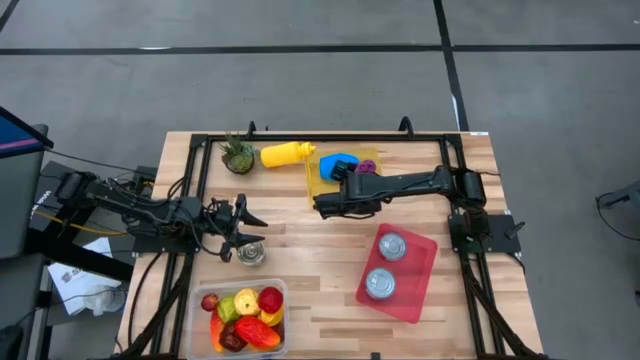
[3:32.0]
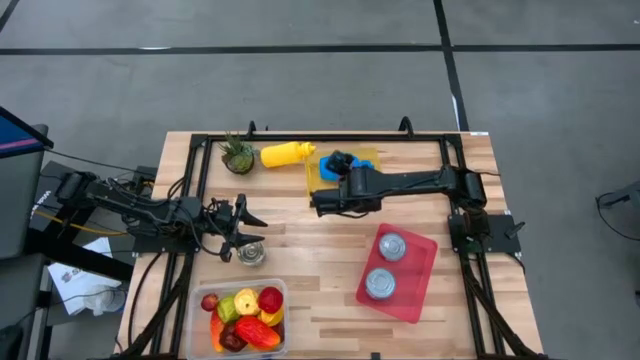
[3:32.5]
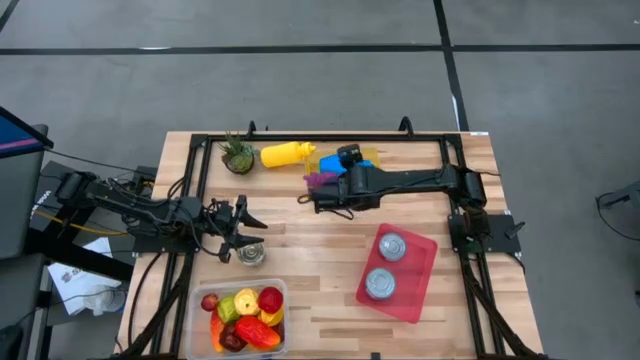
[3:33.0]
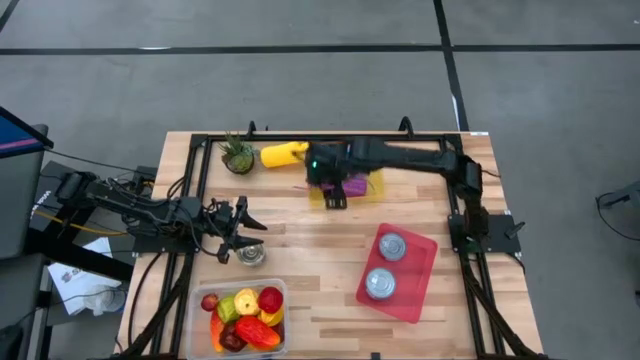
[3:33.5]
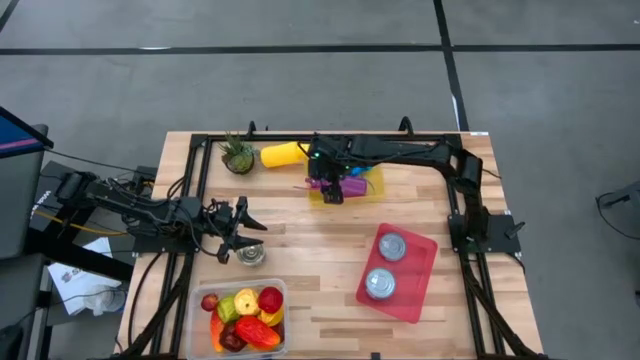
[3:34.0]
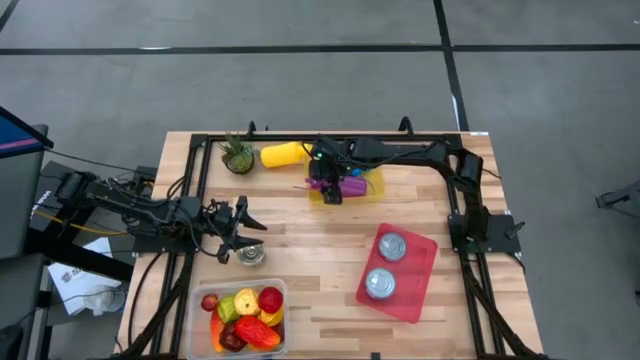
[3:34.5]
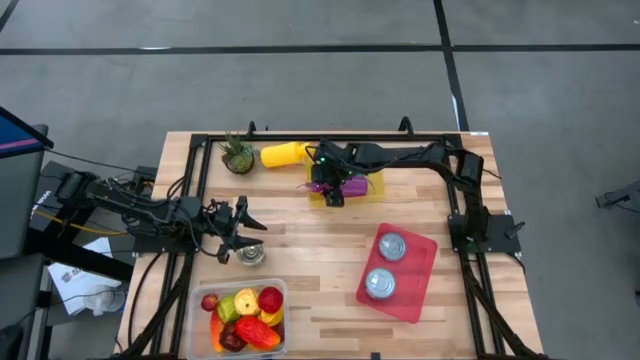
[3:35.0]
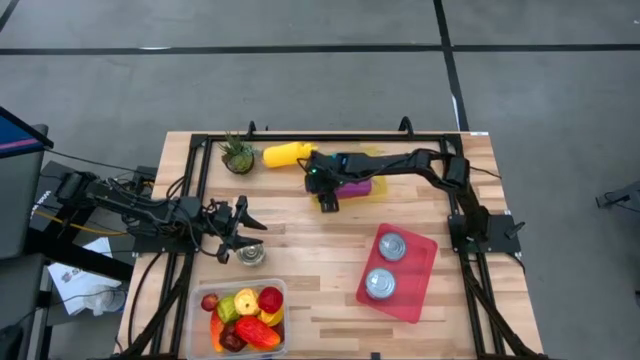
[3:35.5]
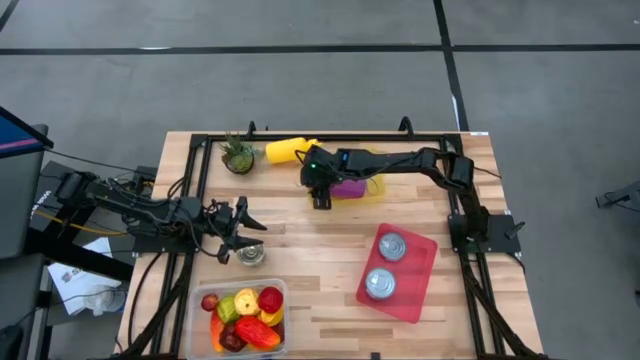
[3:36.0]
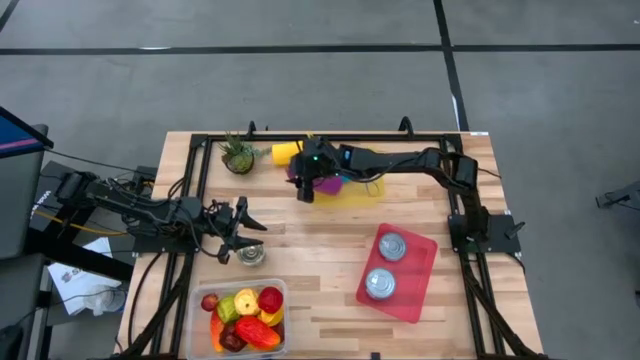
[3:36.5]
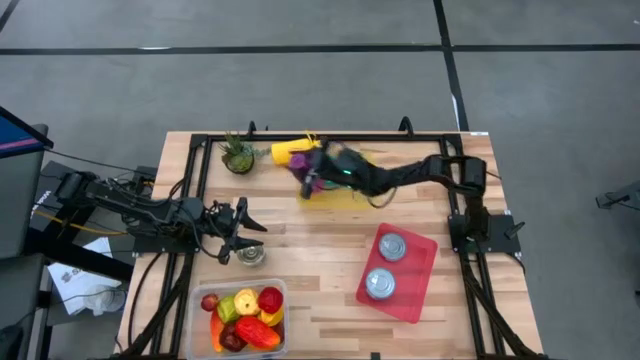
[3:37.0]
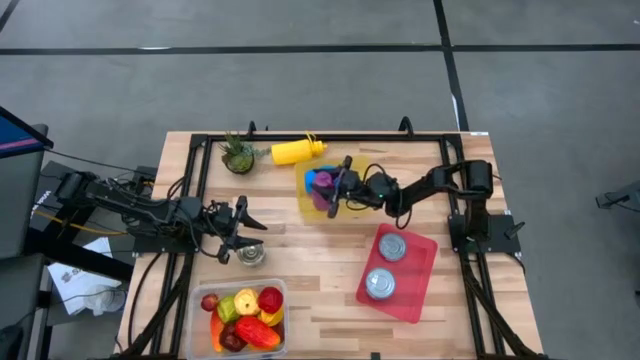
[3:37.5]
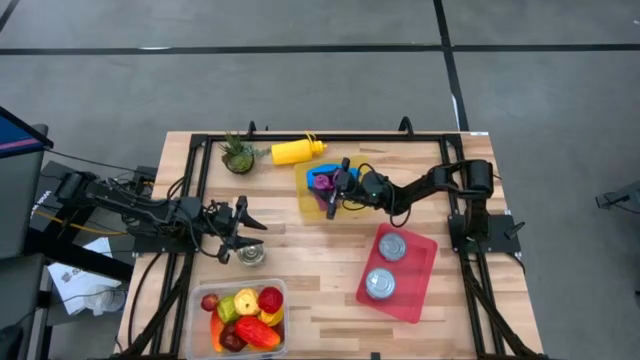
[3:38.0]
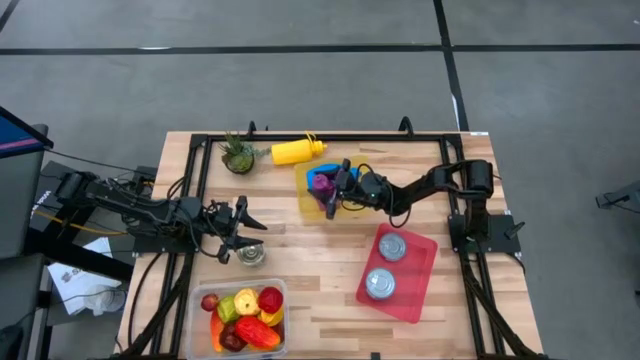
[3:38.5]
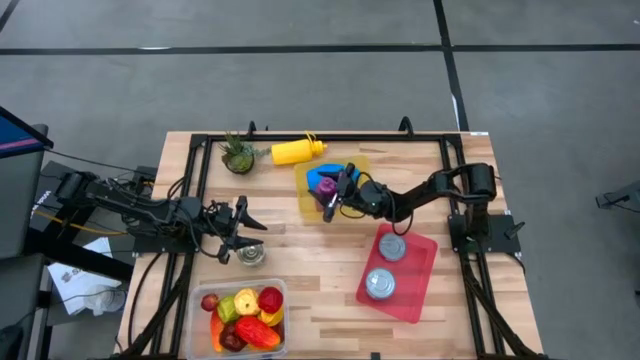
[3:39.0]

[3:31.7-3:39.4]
Task: Pick & Place Food Item
Adjust the purple tumbler in the yellow bin

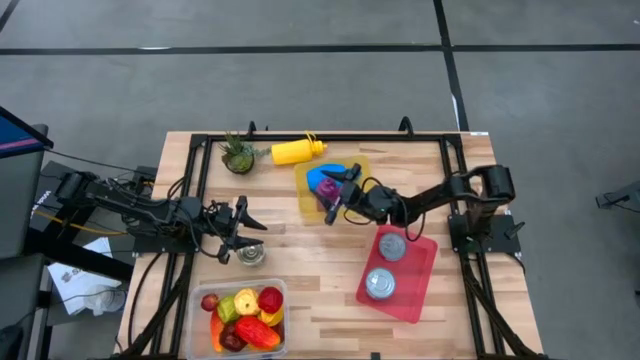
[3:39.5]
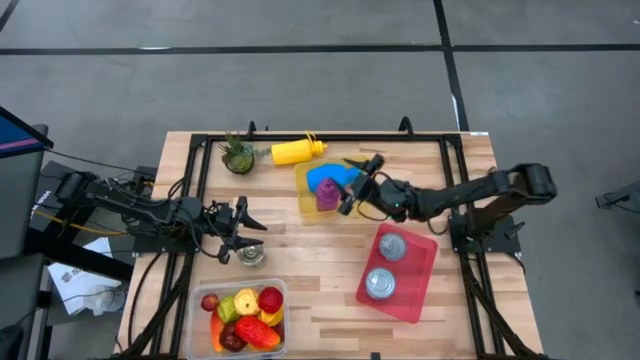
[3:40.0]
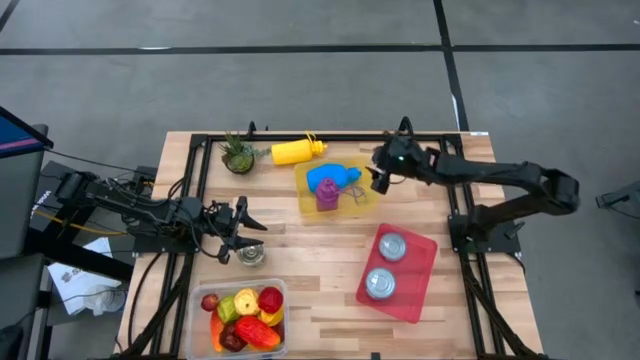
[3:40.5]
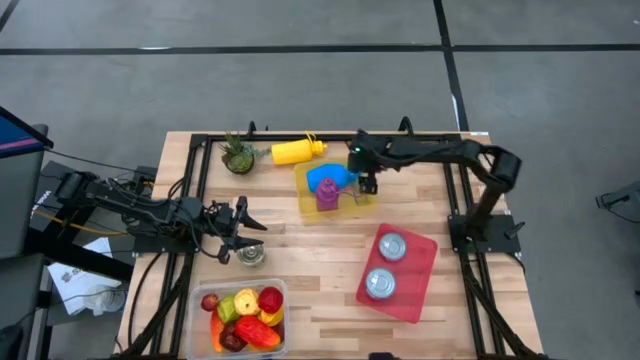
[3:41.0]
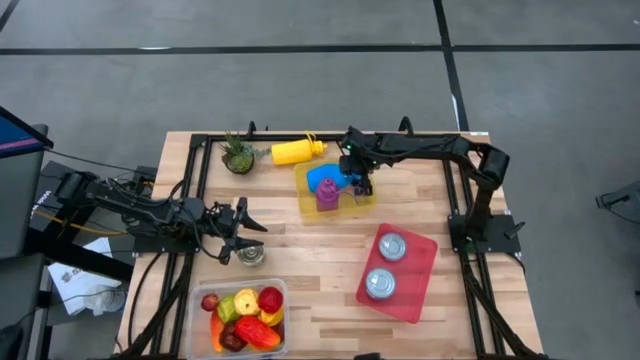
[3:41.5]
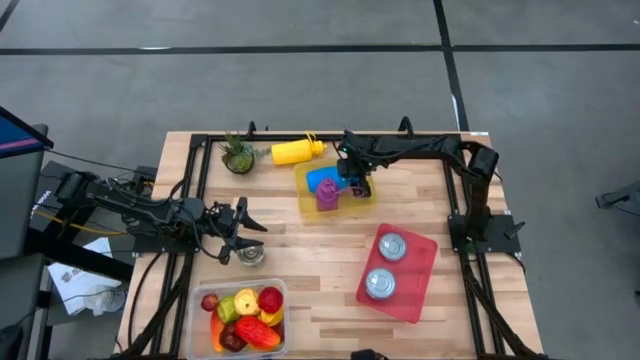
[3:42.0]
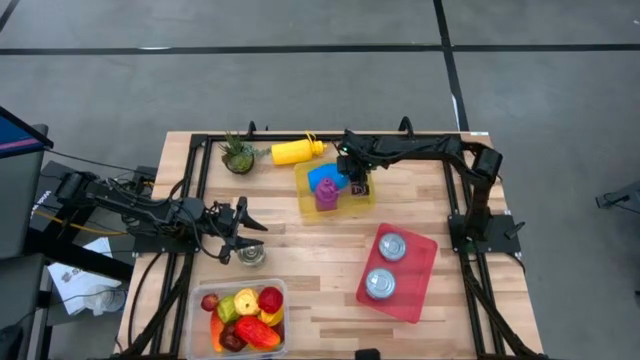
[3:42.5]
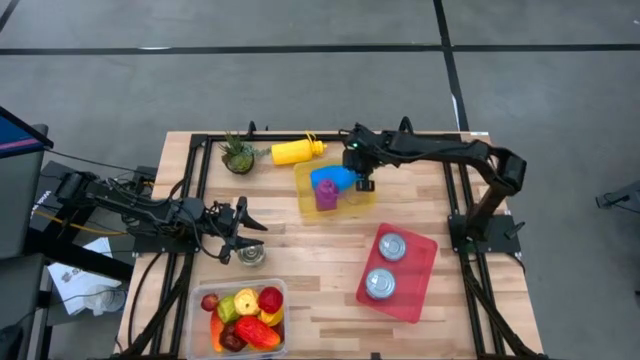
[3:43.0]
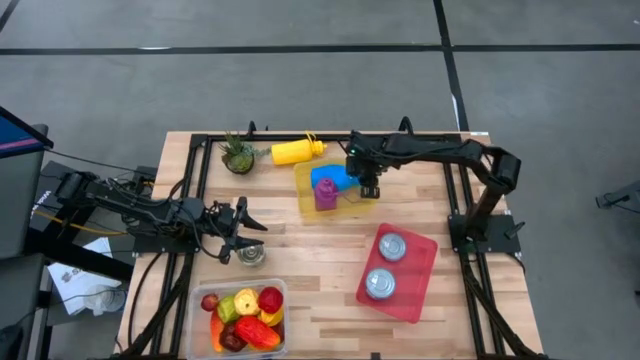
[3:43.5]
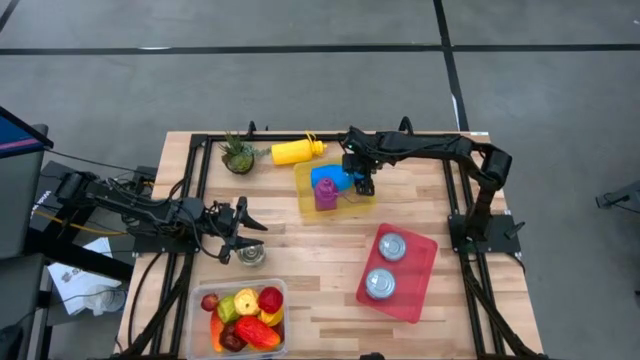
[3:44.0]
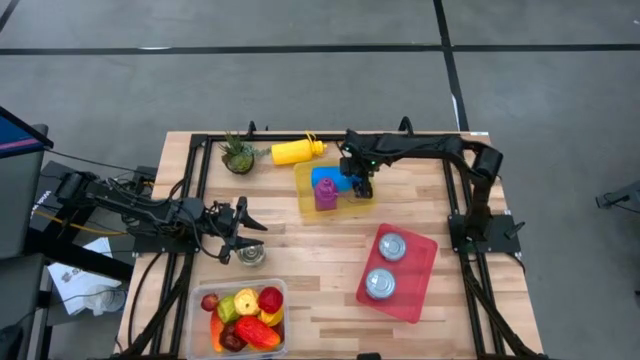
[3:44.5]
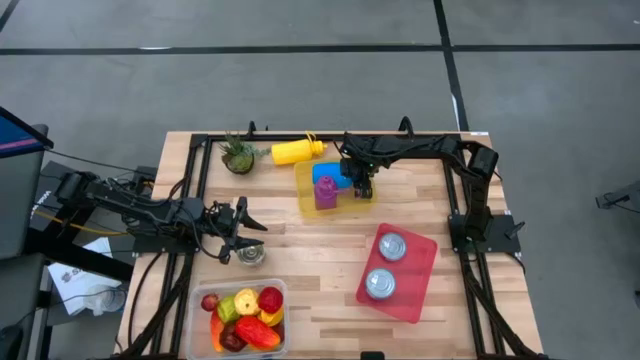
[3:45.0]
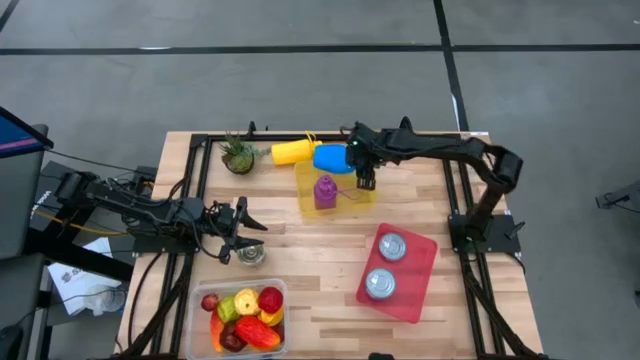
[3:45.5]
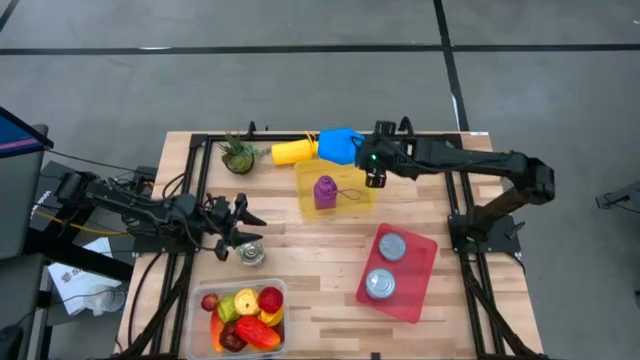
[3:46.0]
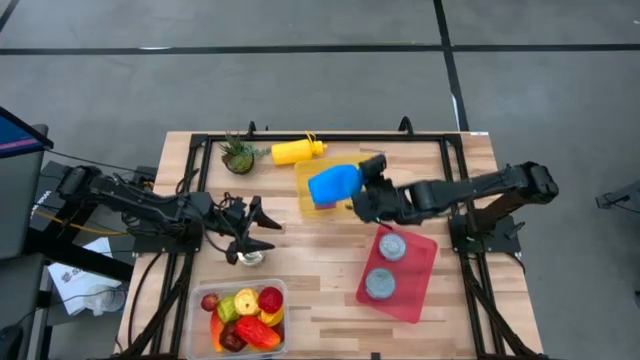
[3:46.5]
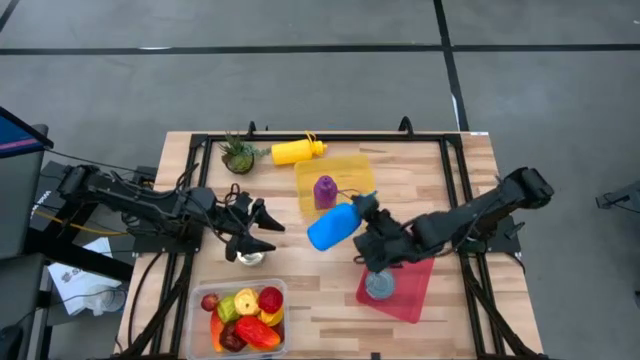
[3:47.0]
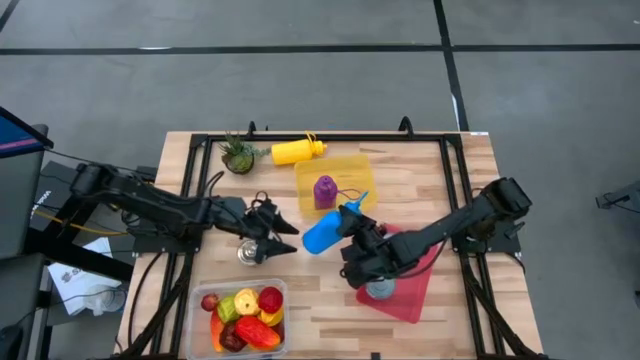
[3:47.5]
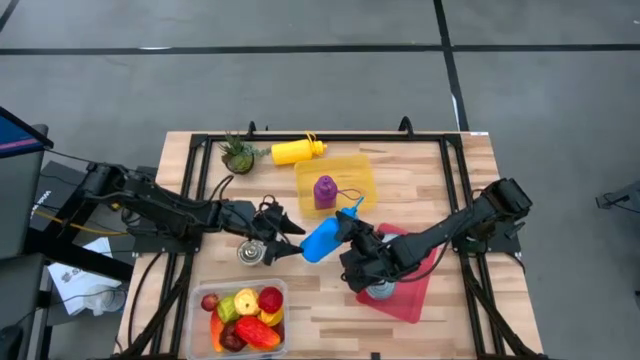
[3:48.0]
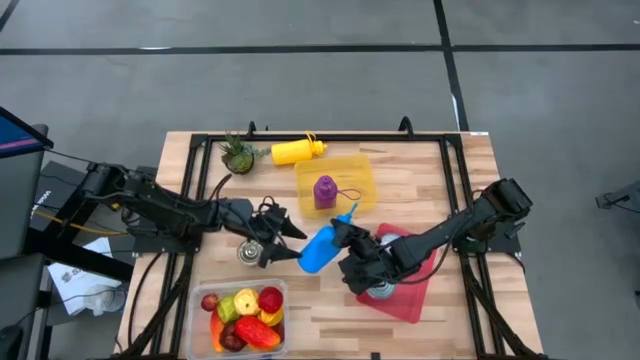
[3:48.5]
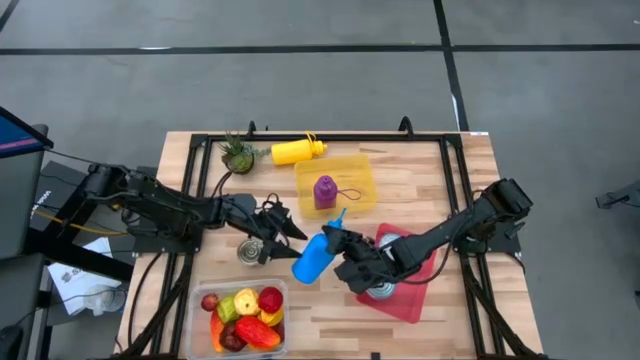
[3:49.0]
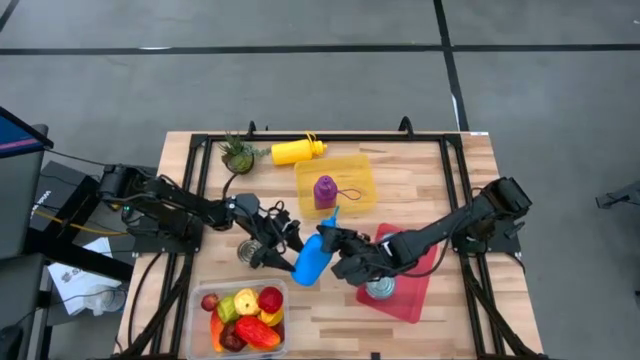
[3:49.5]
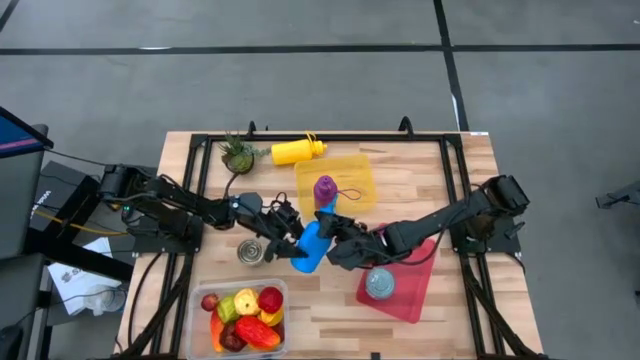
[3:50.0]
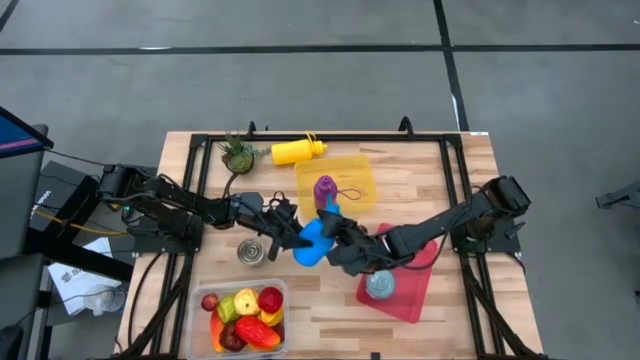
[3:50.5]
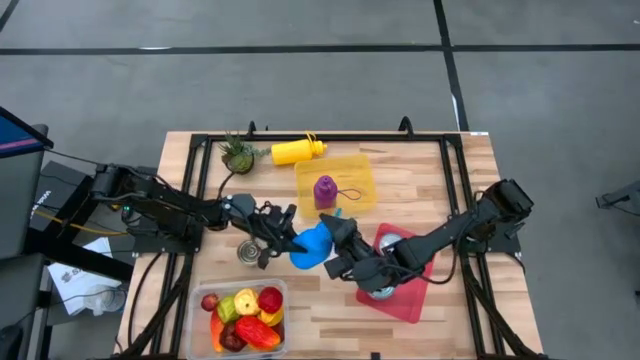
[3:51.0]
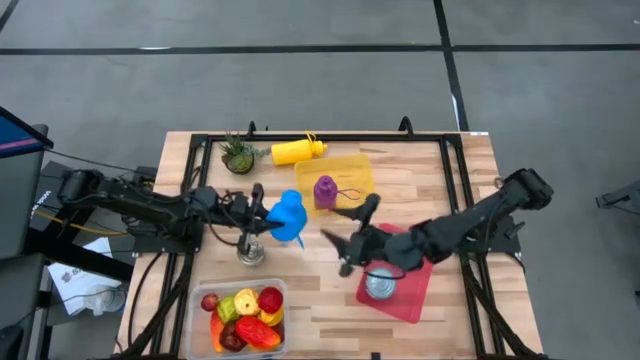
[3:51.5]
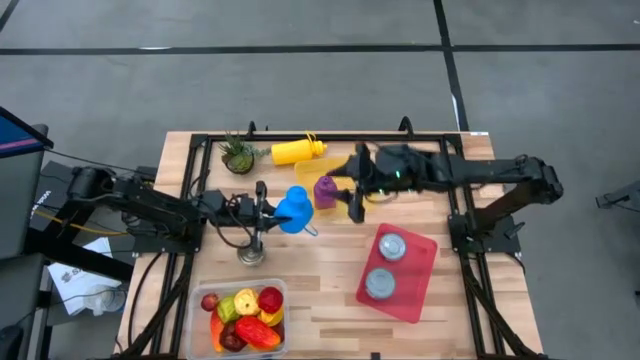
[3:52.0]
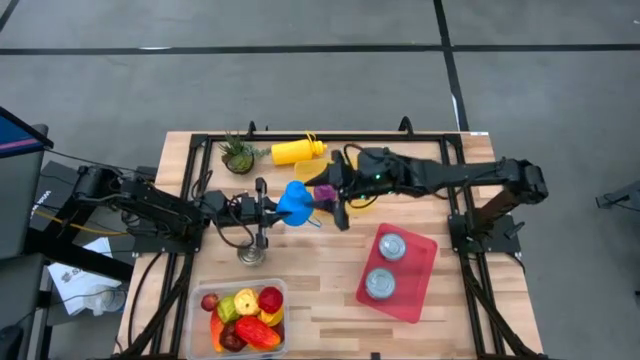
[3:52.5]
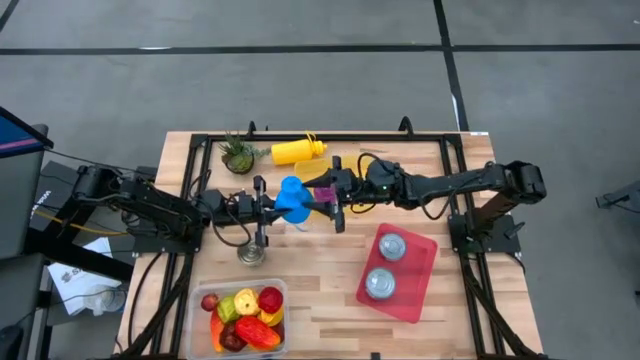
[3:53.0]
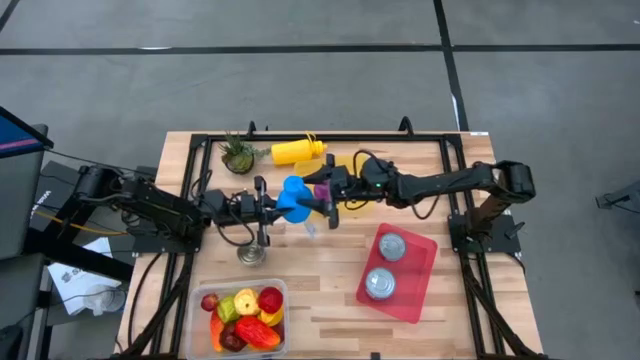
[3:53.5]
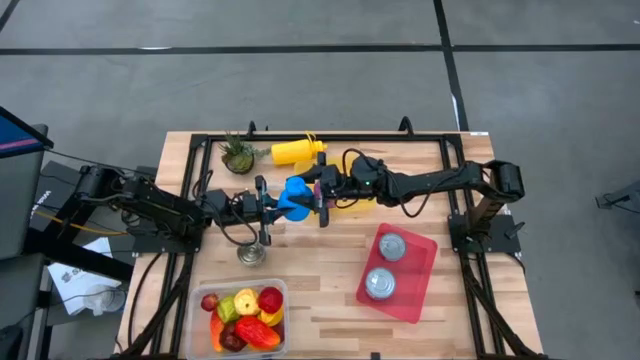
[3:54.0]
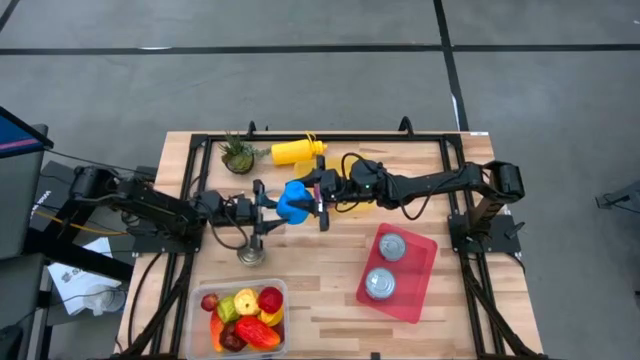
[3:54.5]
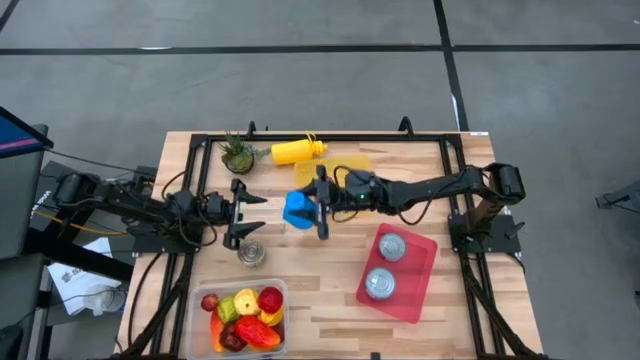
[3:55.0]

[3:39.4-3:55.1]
Adjust the blue tumbler in the yellow bin
